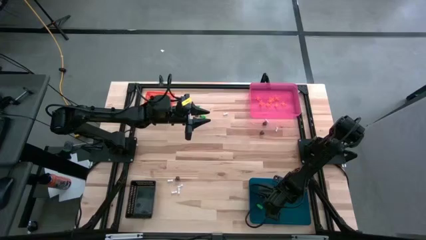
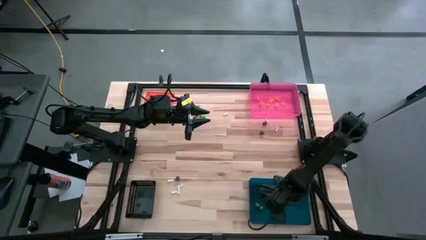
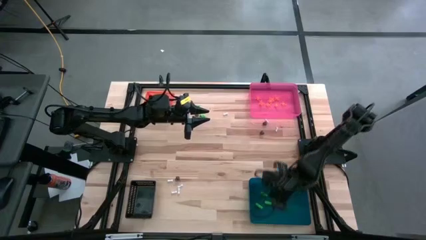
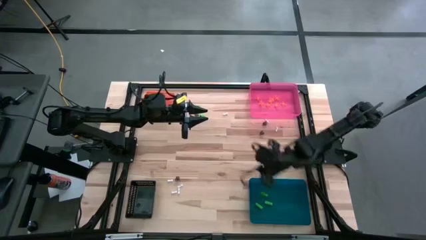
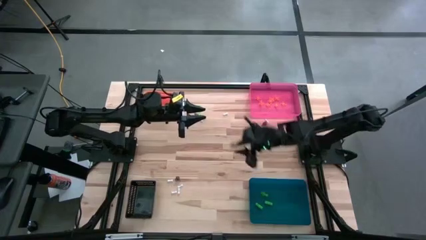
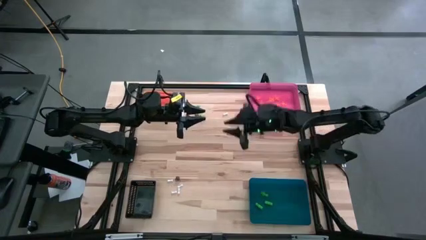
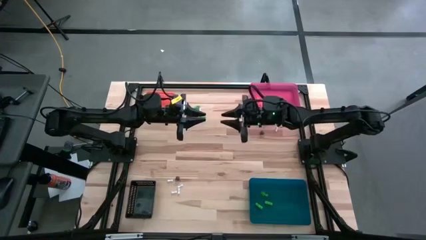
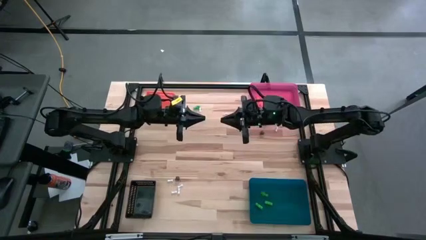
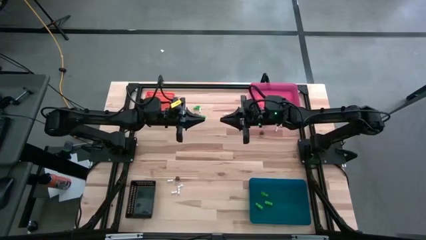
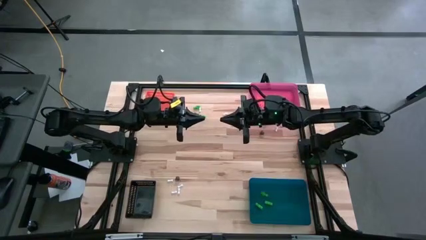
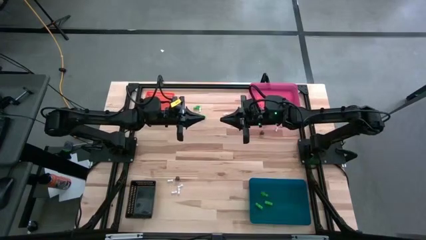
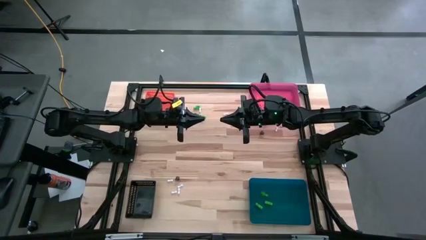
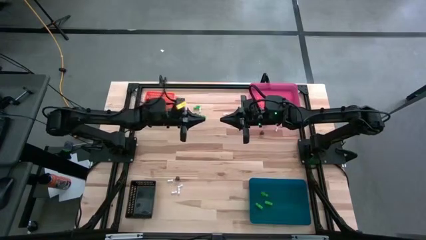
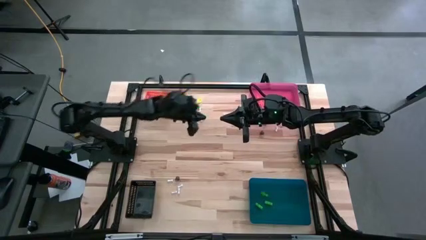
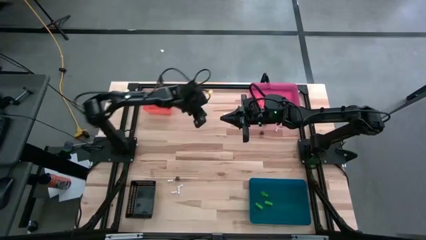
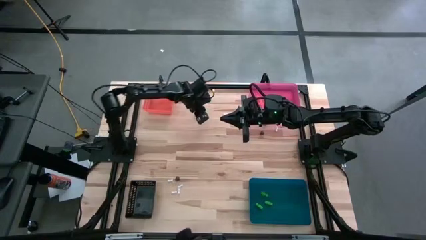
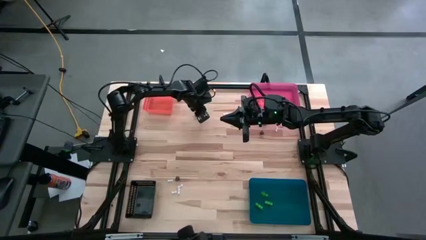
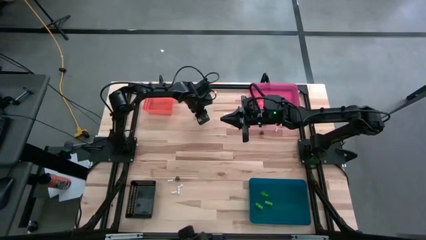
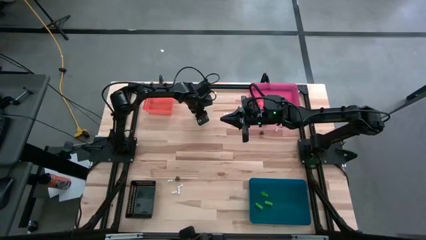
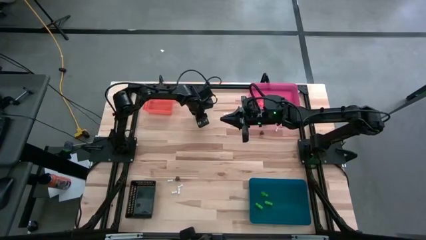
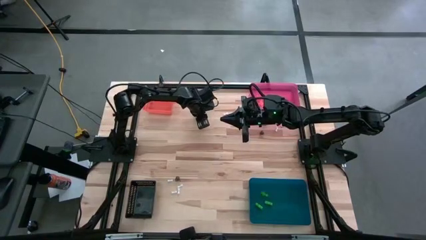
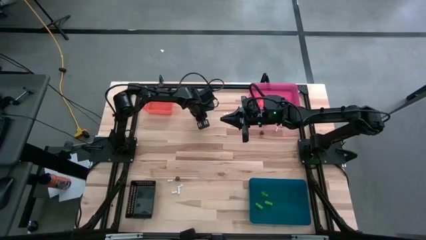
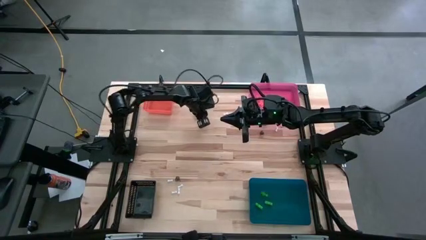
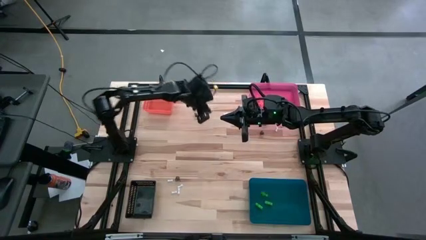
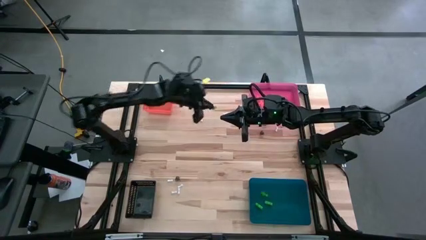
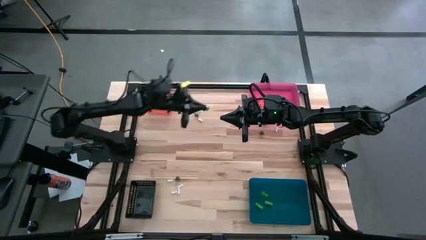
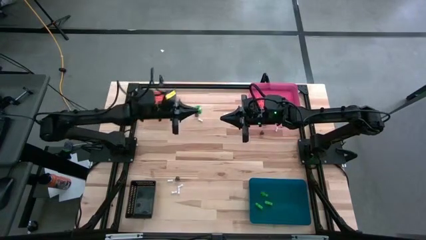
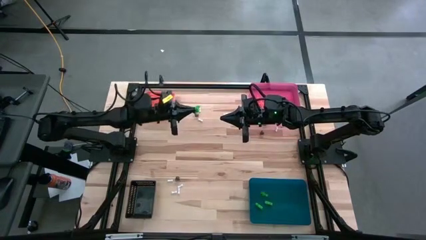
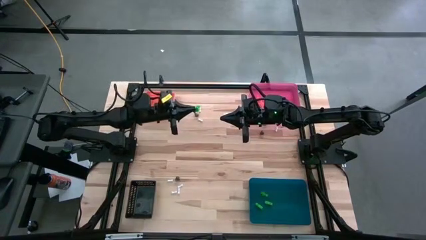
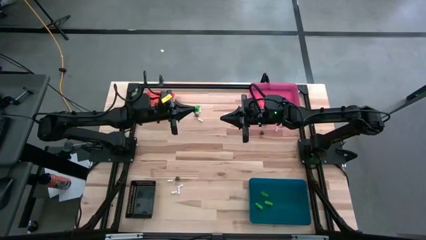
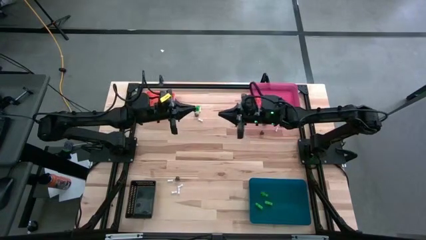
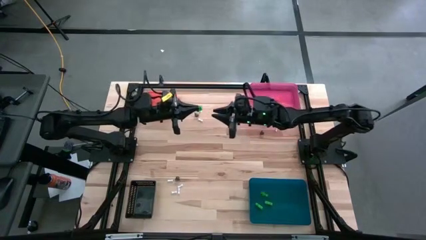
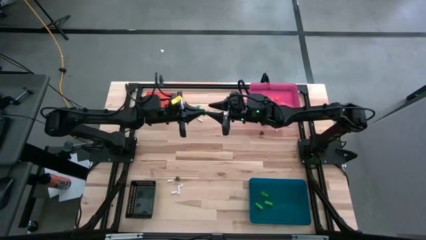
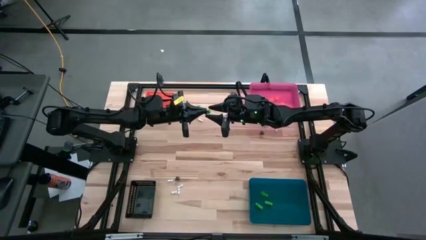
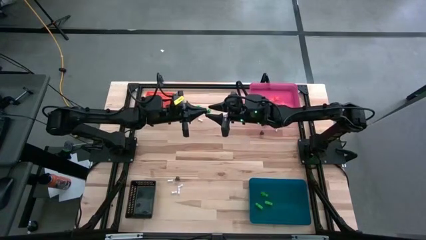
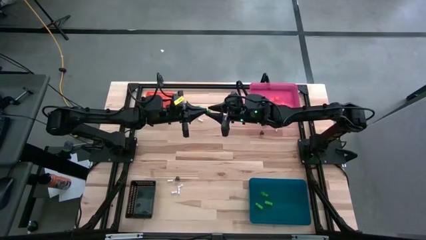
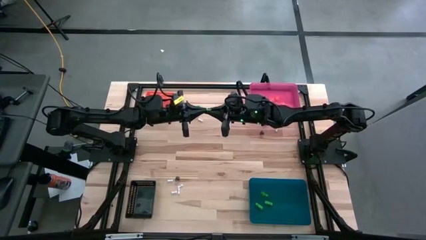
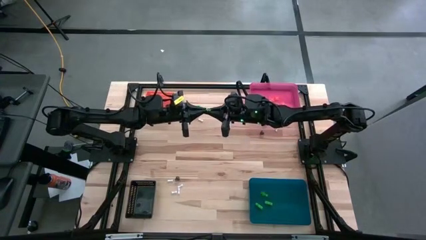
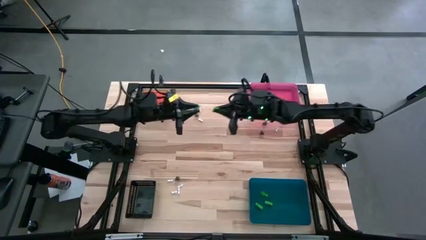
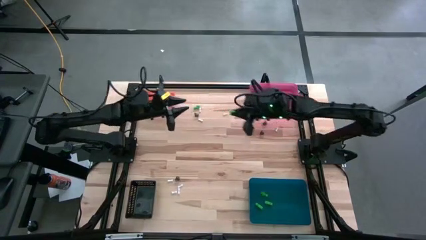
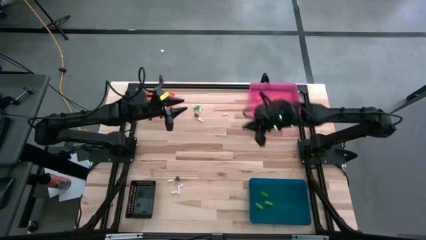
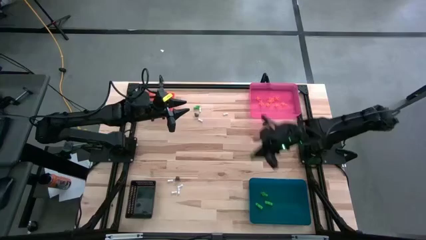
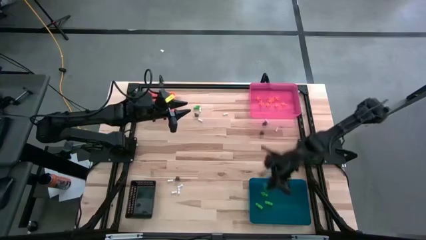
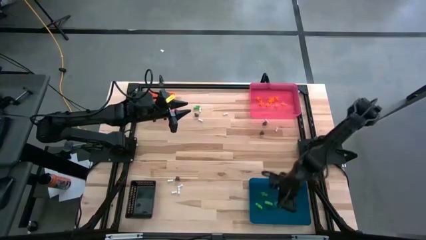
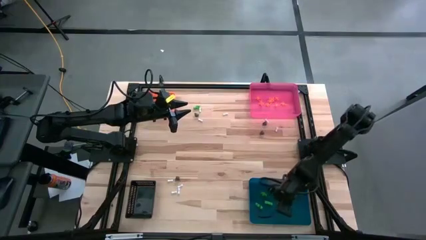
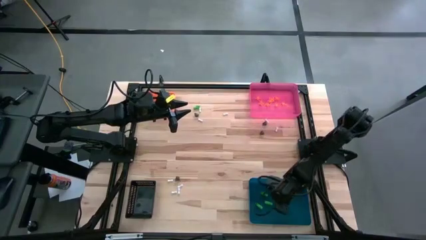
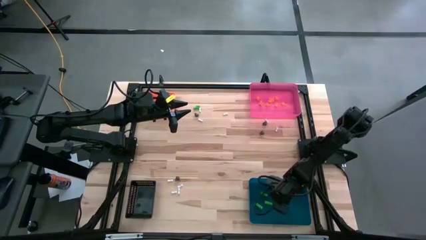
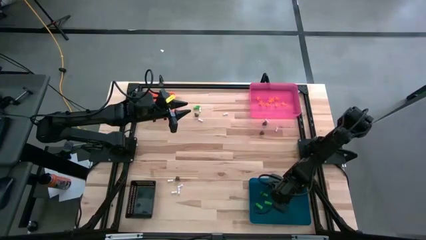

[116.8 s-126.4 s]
Task: Sort Halloween decoration
Put the bottom green skeleton toy into the blue bin

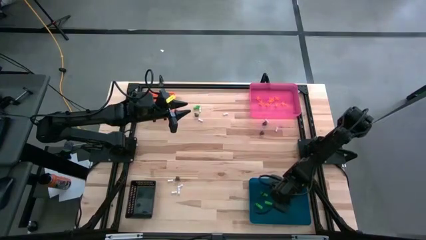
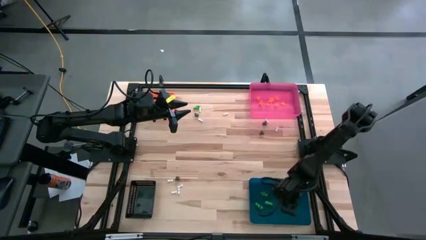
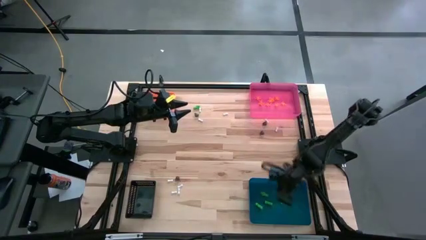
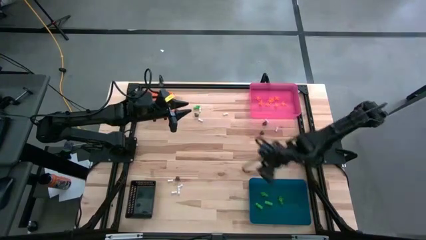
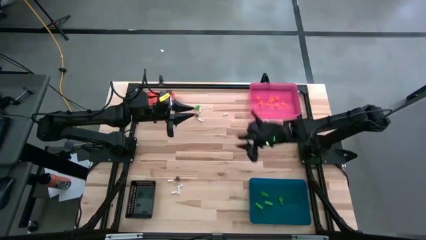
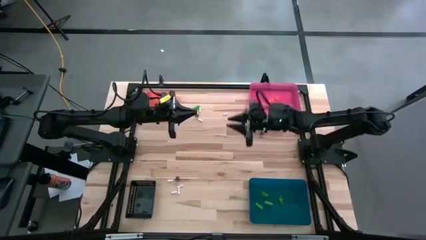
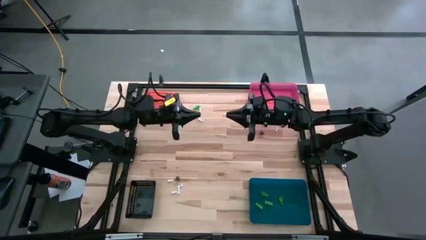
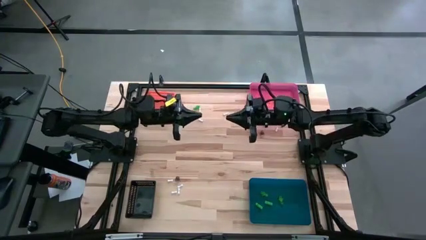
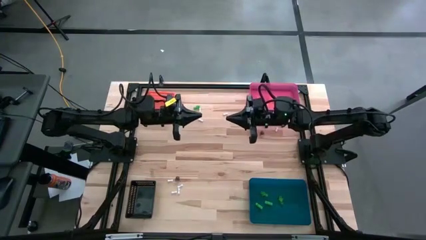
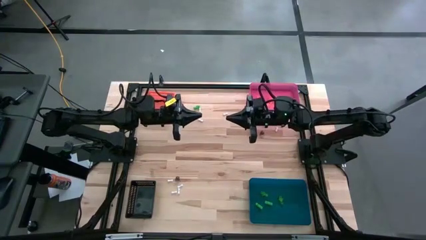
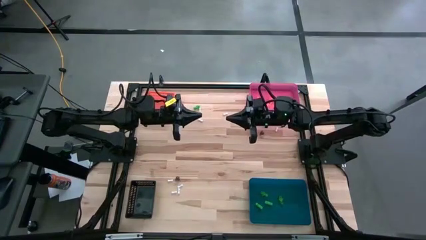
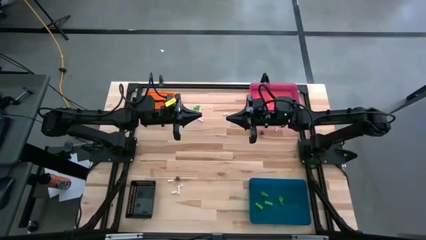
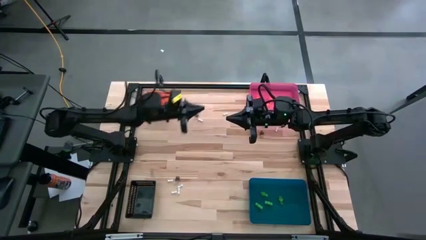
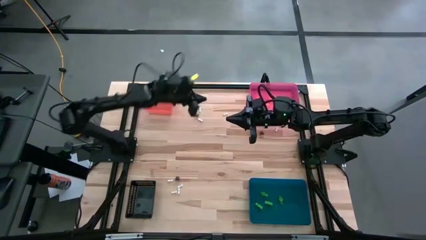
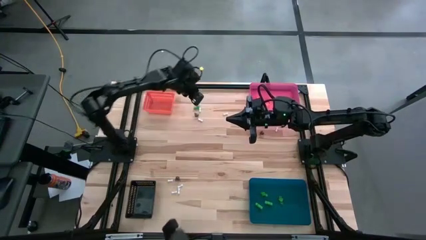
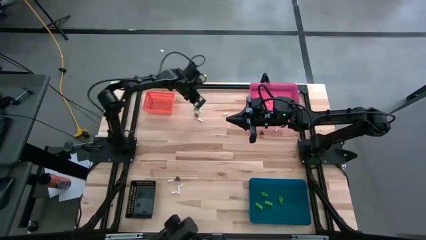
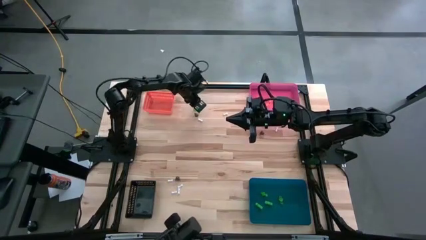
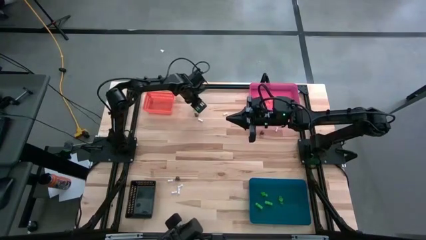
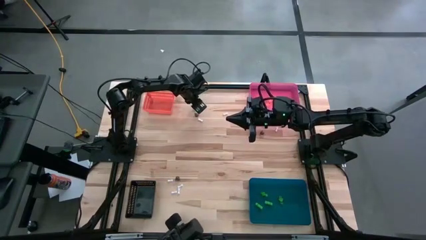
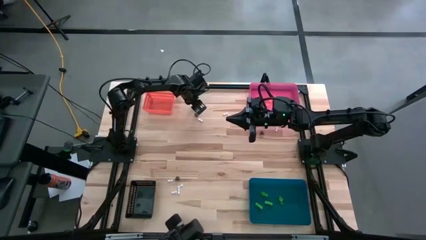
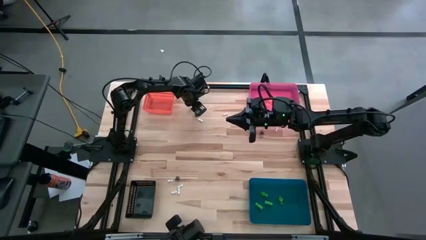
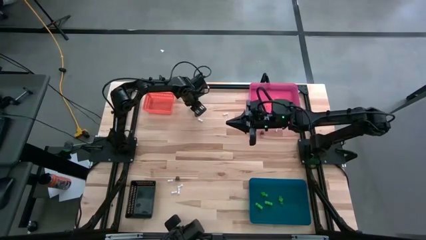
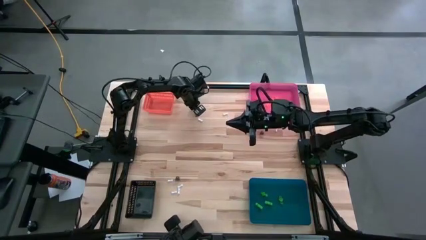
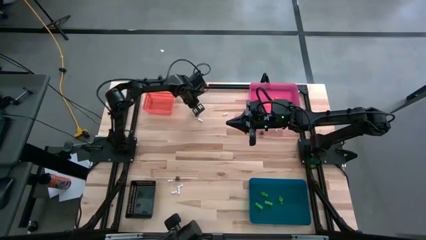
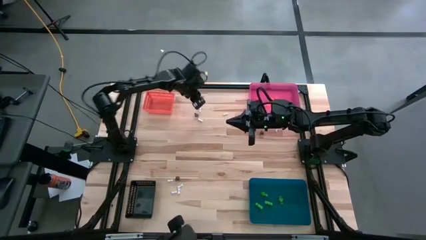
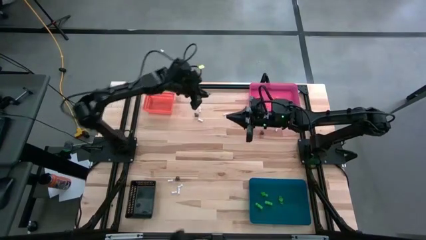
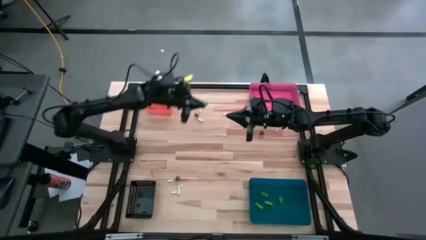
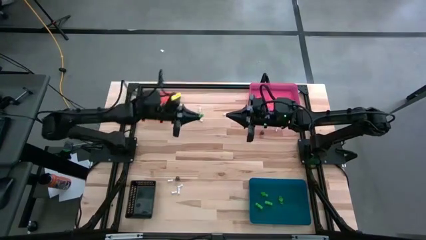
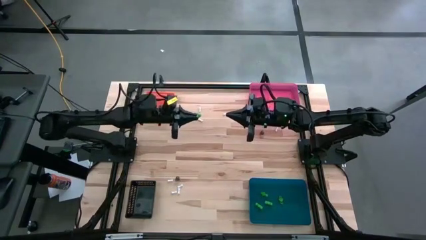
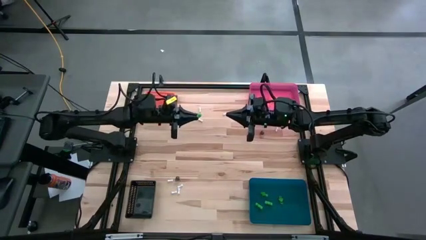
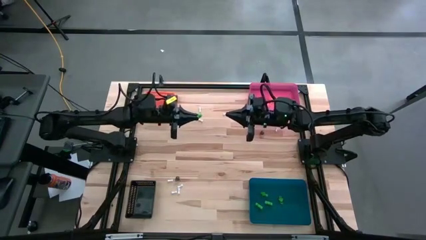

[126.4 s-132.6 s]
Put the green skeleton toy into the blue bin

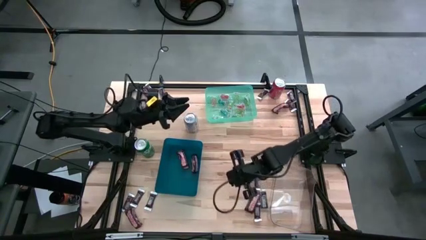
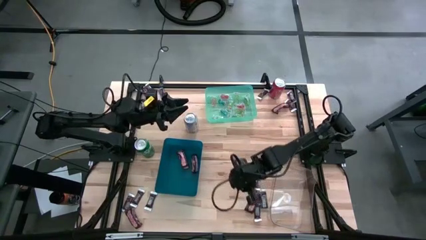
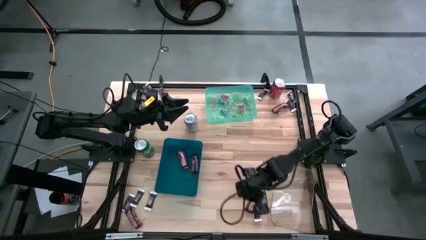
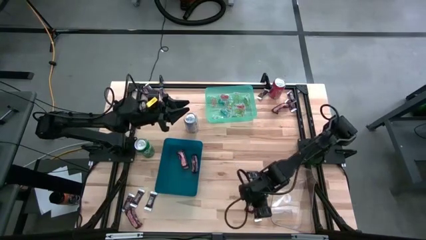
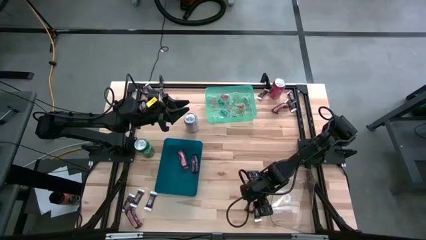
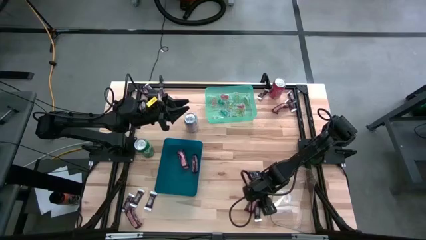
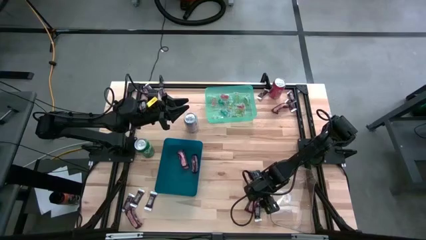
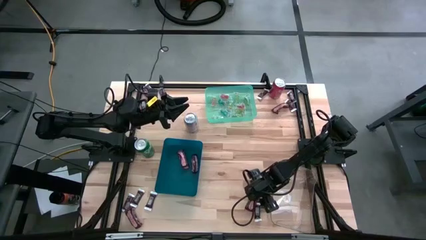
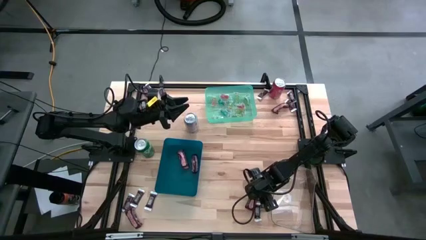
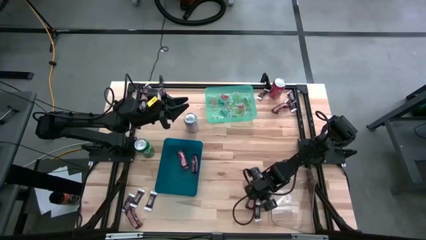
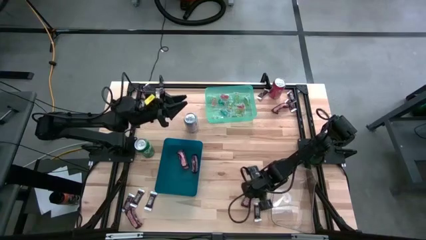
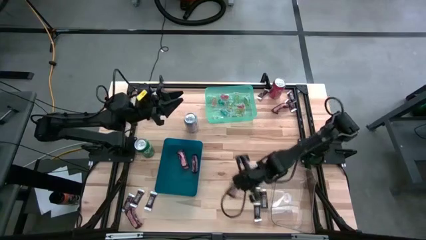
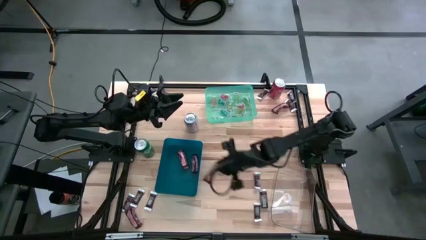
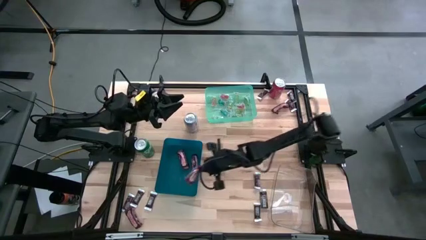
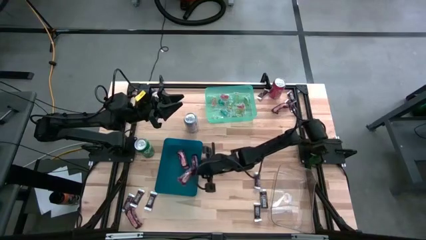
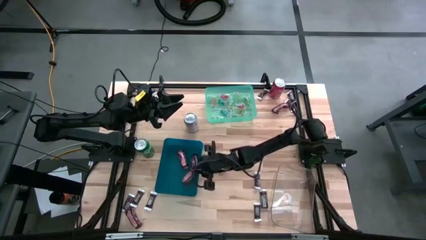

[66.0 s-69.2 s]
Task: Organize candy in baskets
Put the brown chocolate into the blue bin
